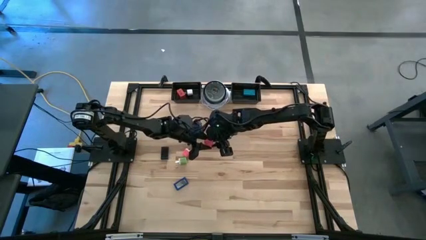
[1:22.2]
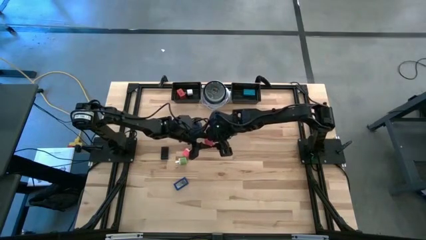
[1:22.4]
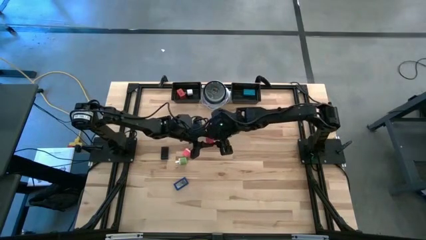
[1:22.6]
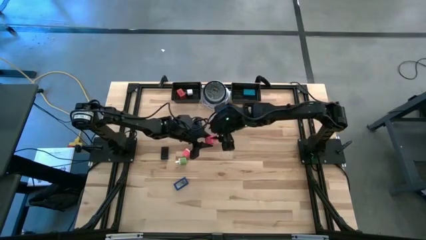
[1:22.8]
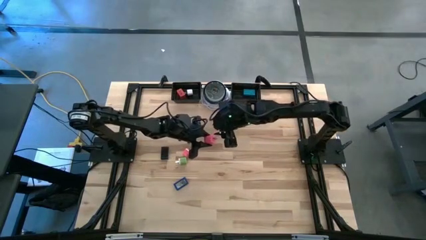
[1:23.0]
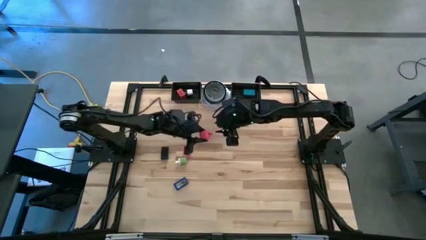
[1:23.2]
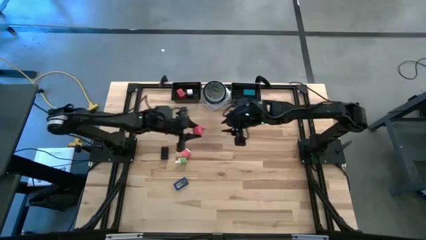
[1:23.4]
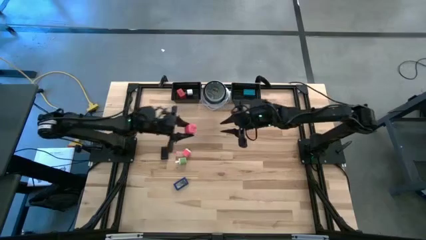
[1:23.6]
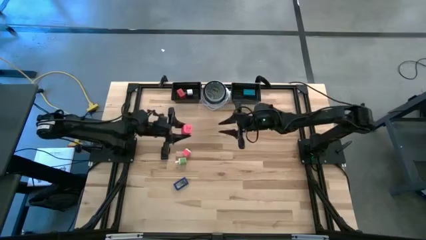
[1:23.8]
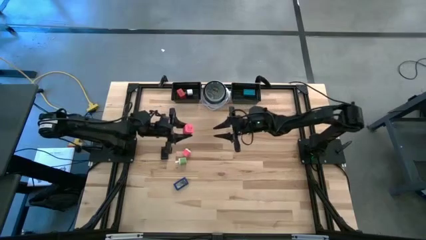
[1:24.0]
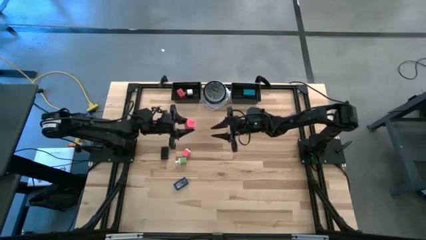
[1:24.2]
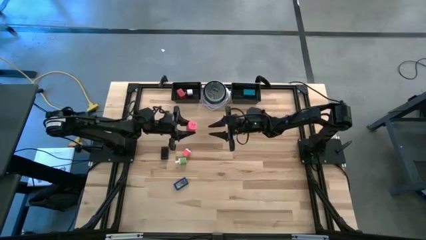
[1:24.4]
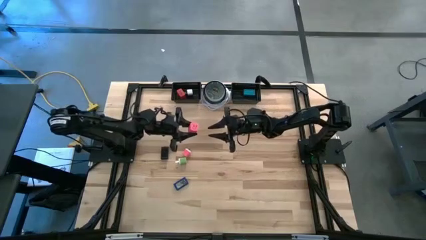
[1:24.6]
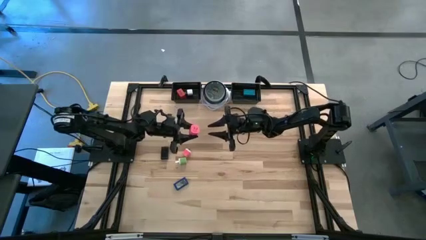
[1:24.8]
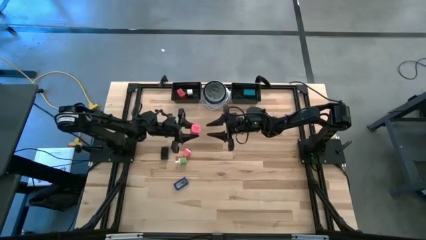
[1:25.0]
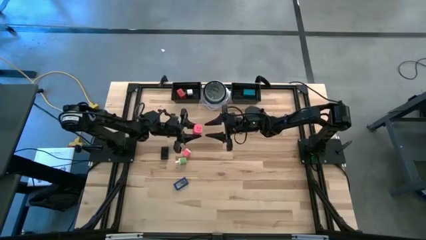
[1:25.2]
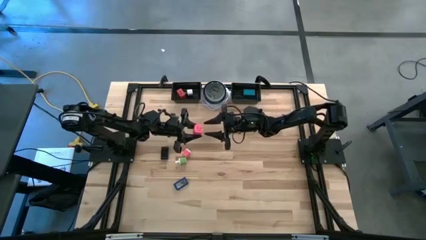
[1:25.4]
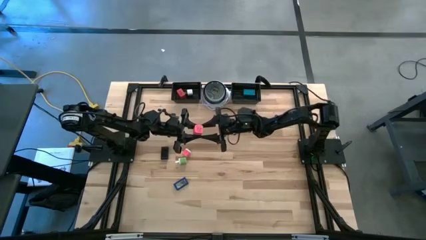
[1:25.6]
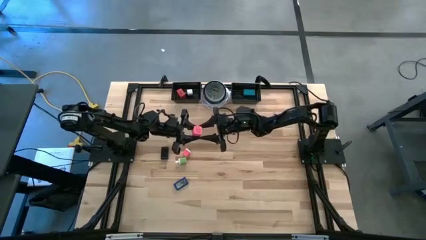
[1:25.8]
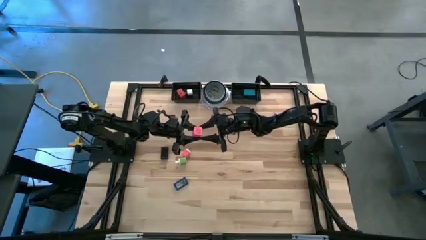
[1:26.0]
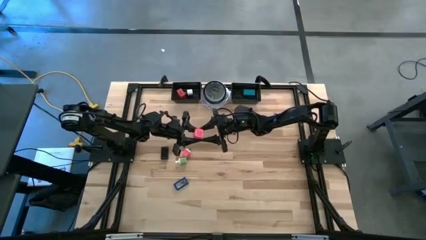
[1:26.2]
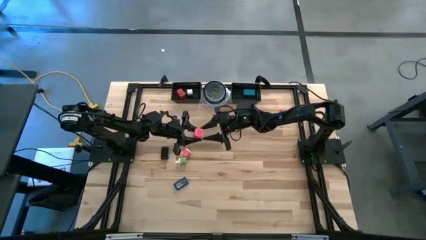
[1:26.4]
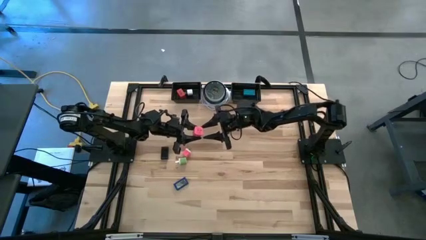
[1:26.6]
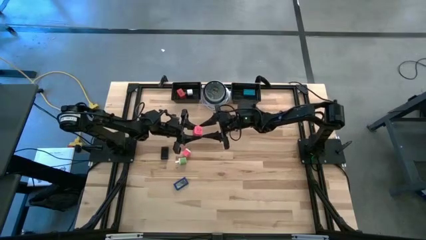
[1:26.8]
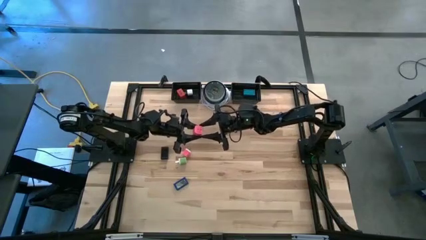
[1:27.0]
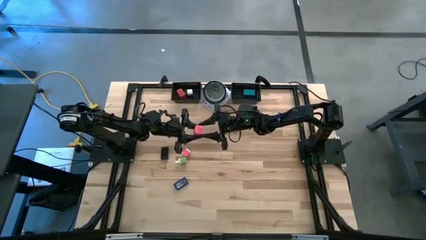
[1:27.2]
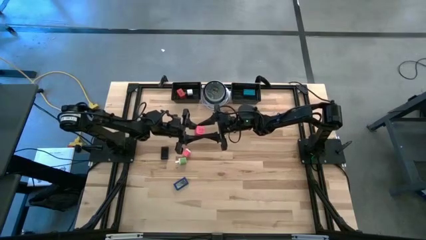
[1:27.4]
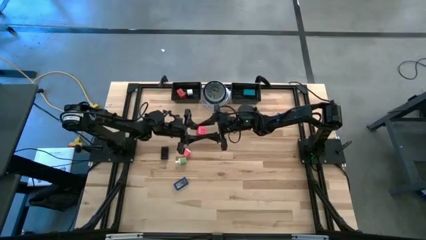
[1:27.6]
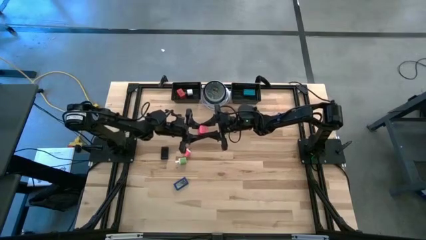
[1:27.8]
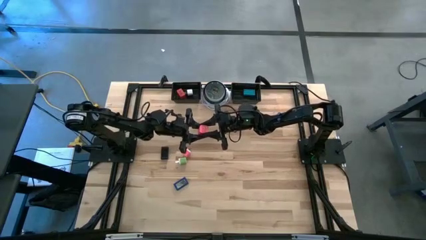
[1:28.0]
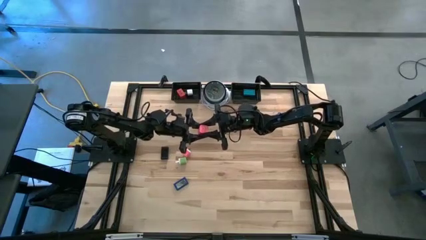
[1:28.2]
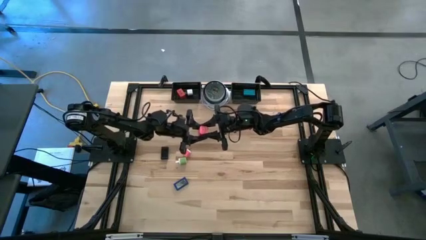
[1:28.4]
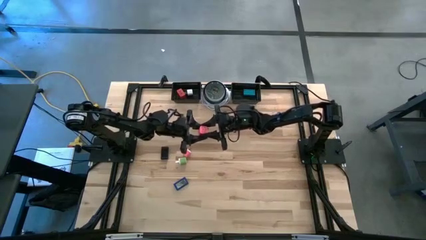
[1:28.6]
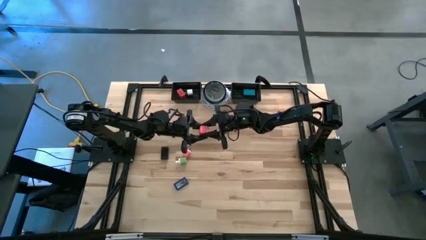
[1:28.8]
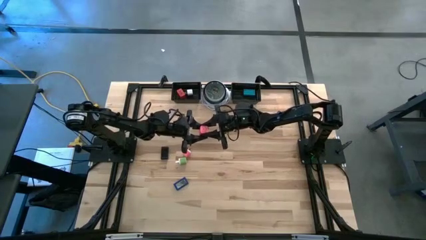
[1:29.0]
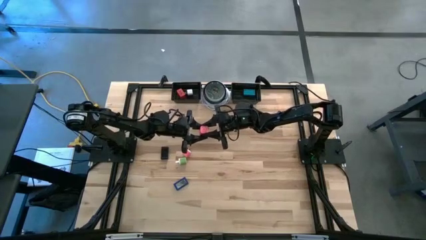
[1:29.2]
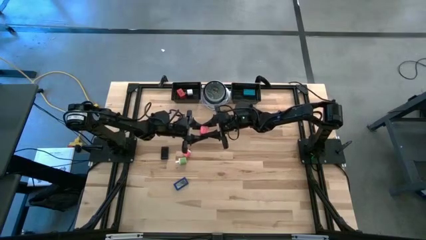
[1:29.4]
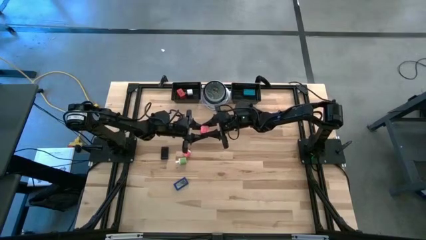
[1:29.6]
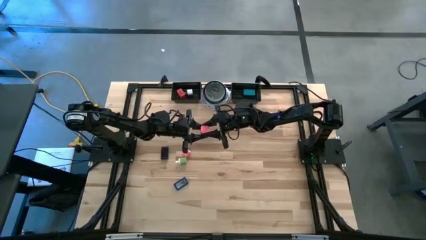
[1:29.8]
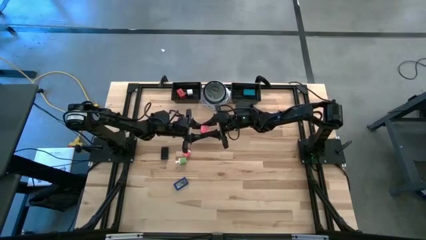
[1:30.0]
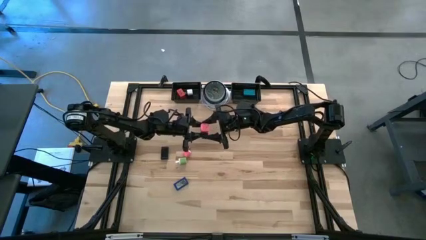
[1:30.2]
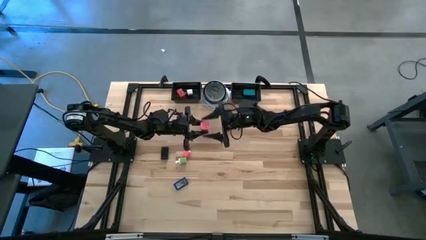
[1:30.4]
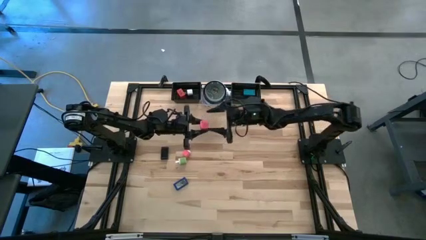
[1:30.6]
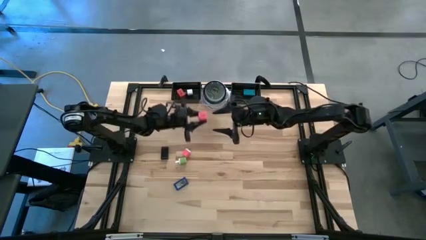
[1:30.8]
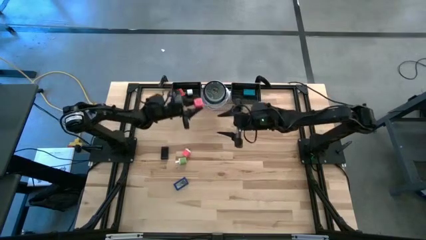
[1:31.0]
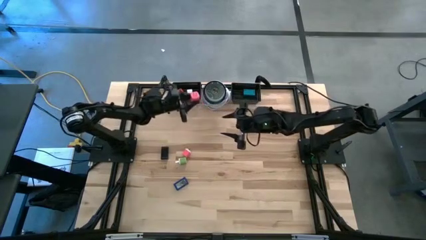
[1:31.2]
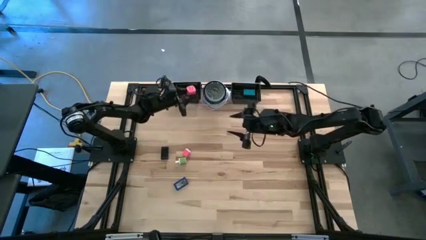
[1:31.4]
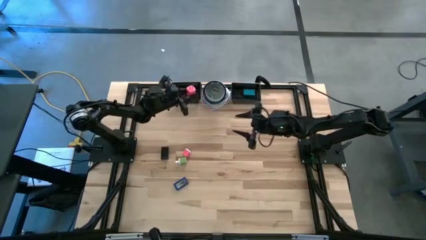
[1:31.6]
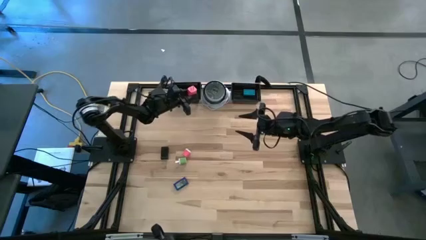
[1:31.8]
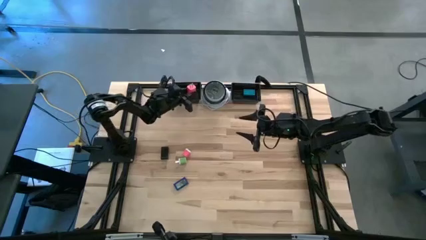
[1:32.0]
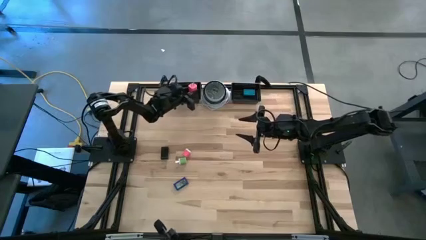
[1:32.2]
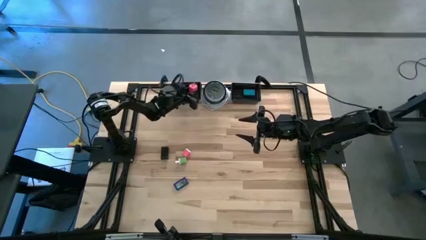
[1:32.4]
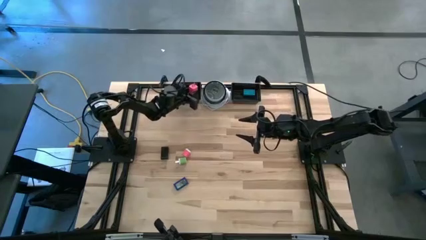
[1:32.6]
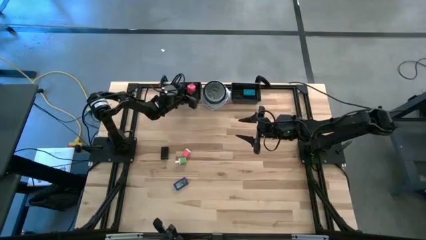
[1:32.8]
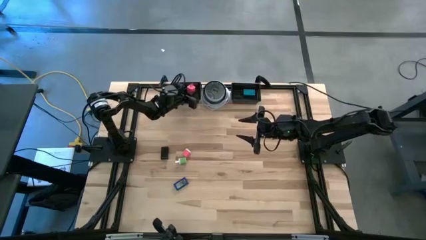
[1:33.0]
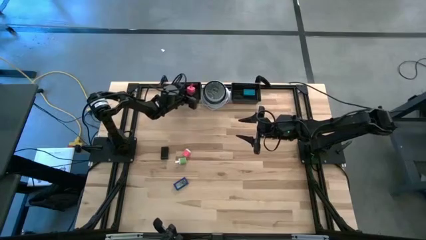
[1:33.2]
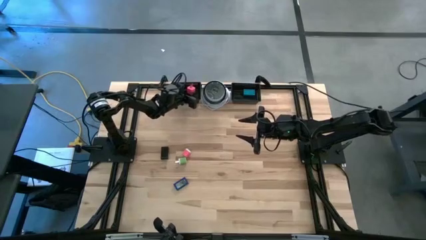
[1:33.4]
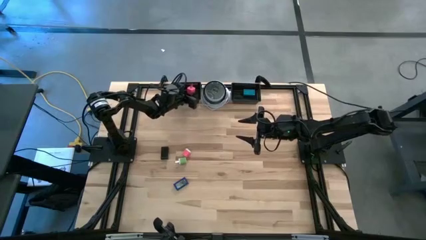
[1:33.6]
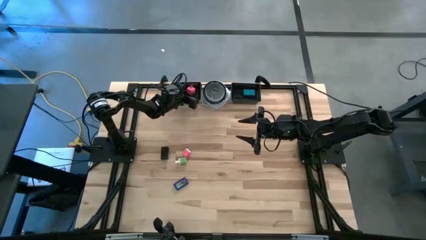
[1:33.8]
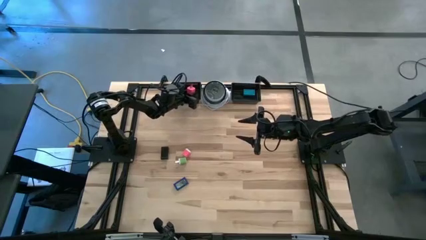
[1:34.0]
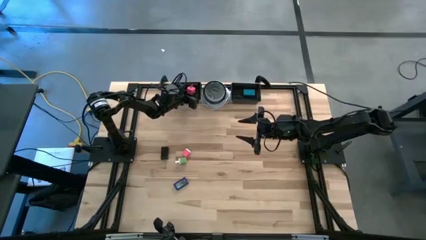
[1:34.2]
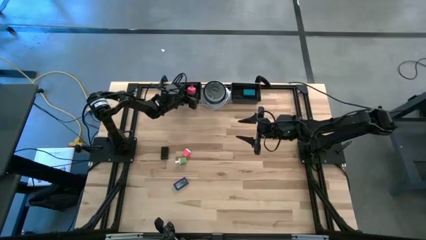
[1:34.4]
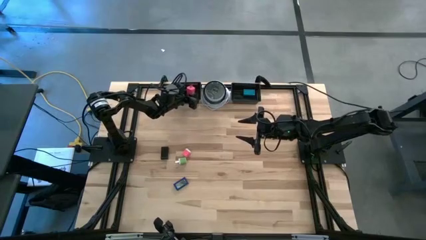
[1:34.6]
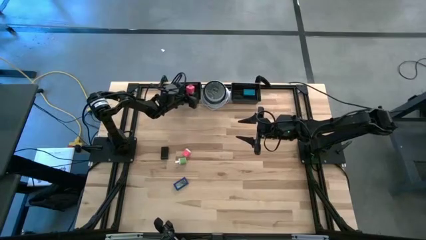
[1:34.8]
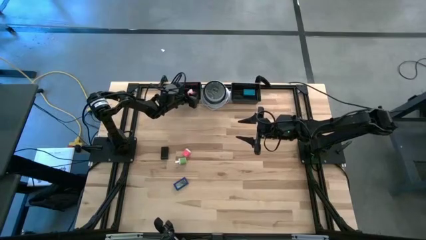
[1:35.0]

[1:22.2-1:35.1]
Task: Pick & Place Office items
Put the right pink charger adapter into the left black basket
